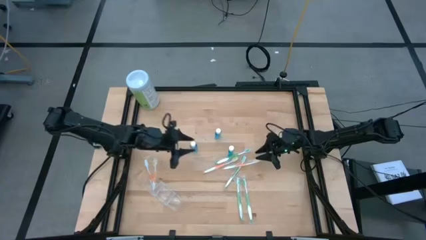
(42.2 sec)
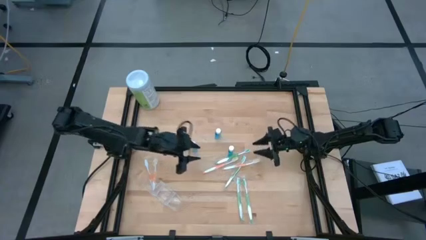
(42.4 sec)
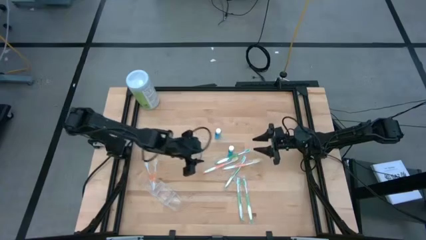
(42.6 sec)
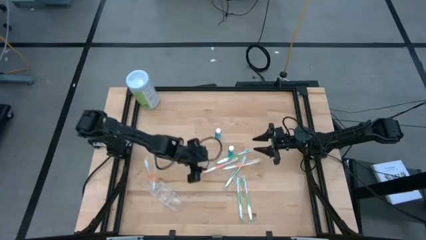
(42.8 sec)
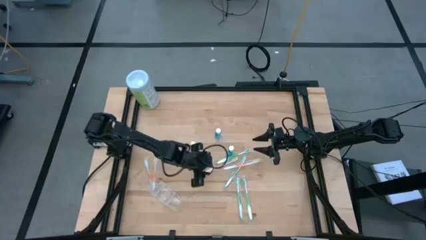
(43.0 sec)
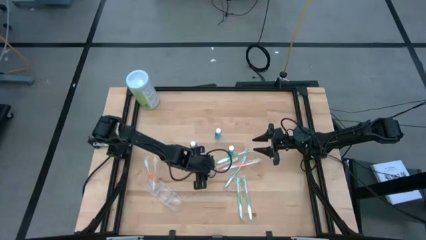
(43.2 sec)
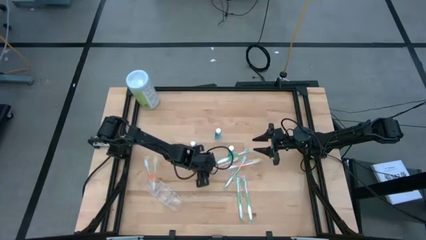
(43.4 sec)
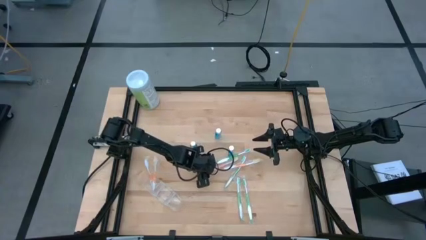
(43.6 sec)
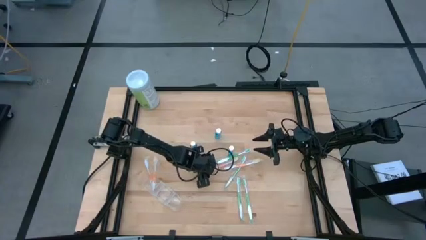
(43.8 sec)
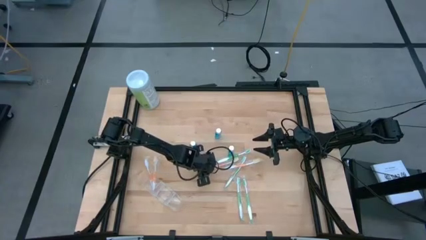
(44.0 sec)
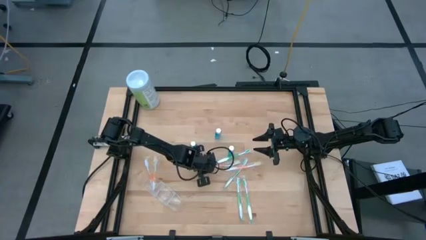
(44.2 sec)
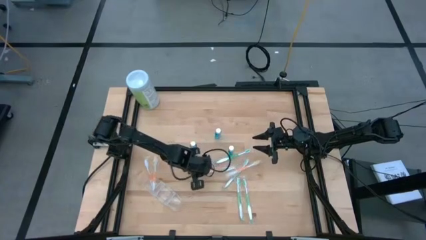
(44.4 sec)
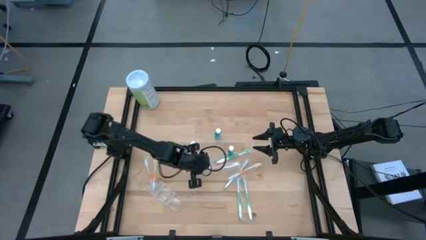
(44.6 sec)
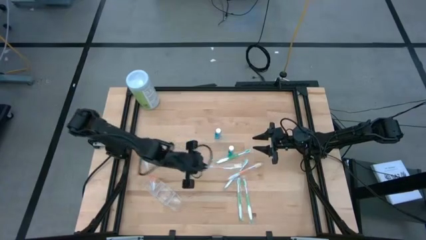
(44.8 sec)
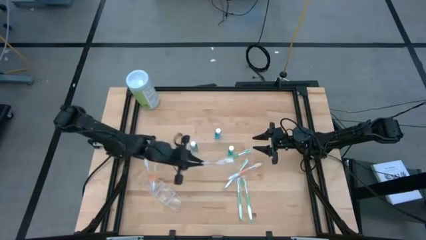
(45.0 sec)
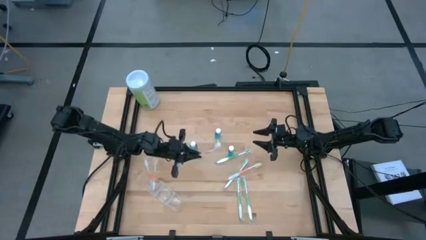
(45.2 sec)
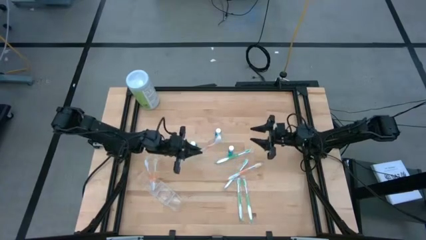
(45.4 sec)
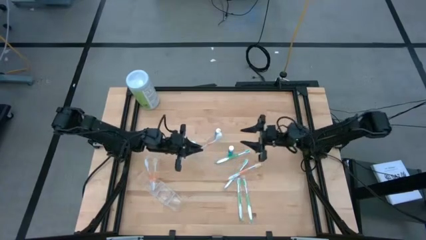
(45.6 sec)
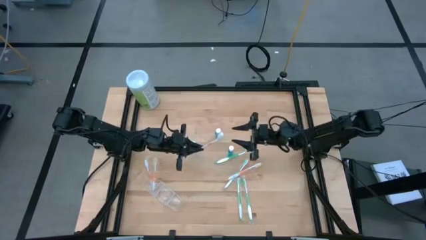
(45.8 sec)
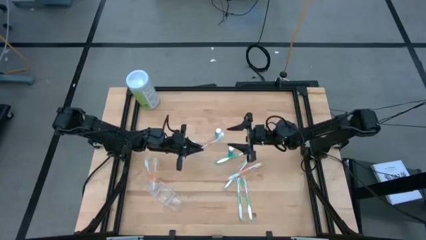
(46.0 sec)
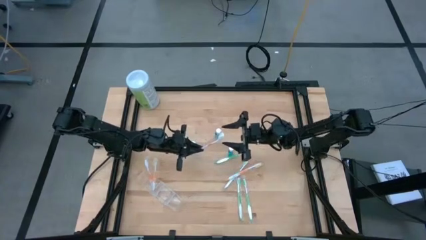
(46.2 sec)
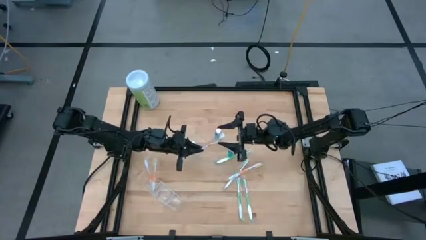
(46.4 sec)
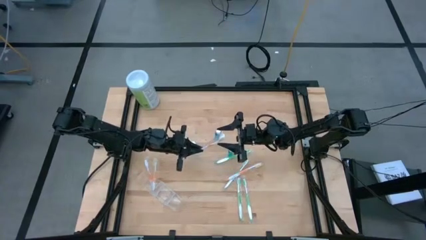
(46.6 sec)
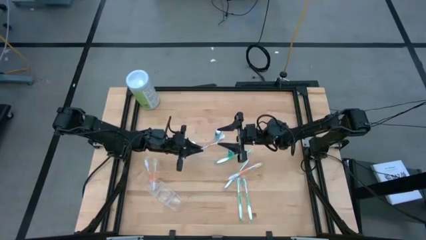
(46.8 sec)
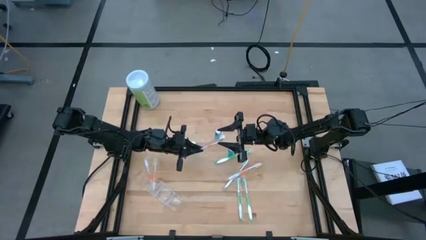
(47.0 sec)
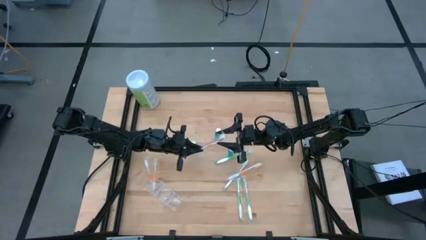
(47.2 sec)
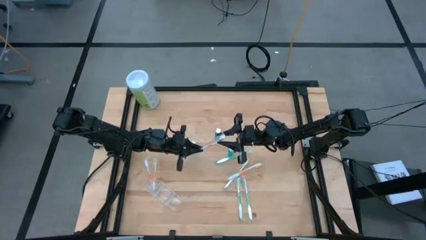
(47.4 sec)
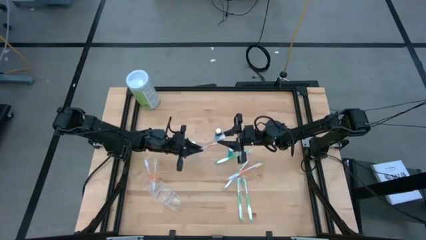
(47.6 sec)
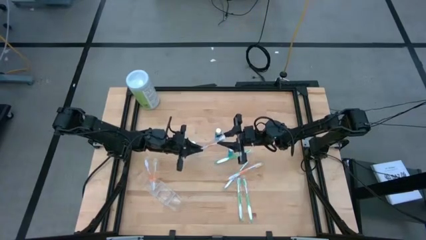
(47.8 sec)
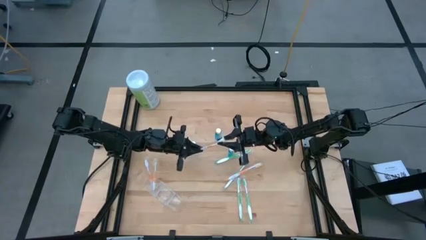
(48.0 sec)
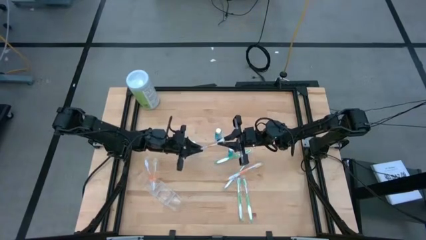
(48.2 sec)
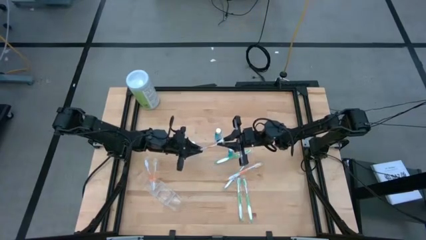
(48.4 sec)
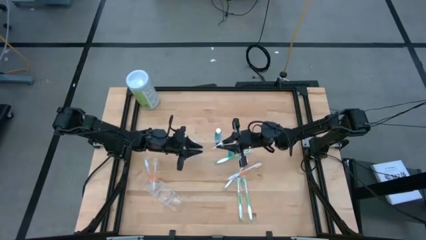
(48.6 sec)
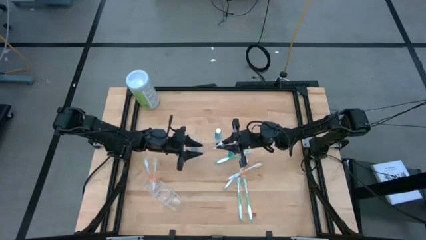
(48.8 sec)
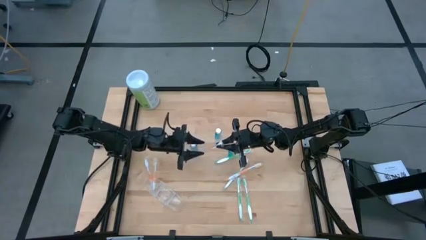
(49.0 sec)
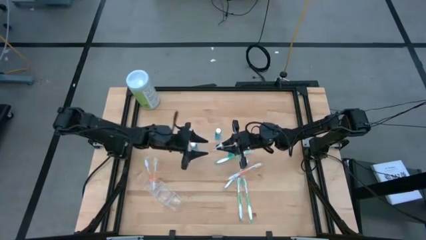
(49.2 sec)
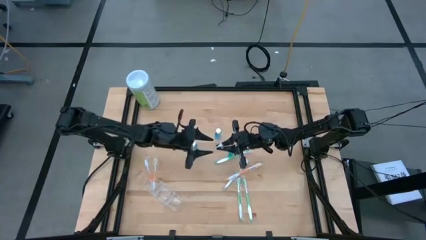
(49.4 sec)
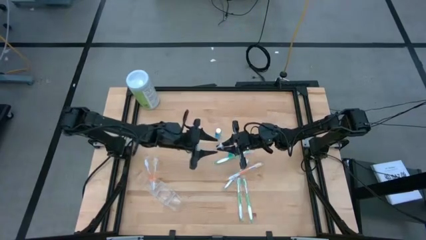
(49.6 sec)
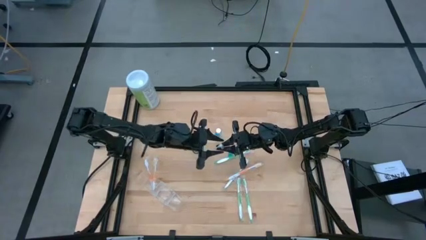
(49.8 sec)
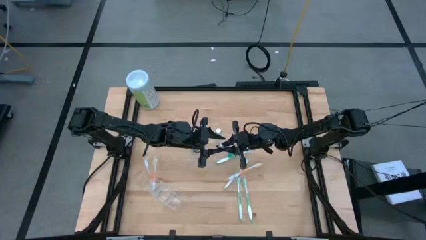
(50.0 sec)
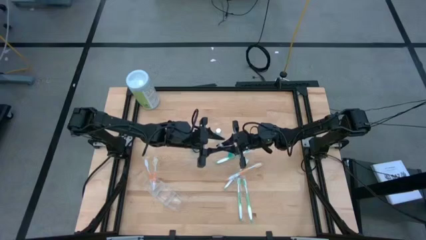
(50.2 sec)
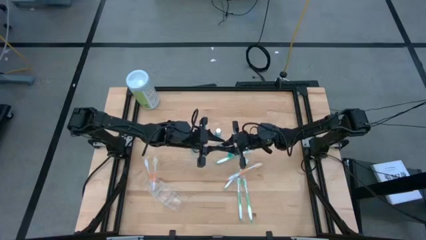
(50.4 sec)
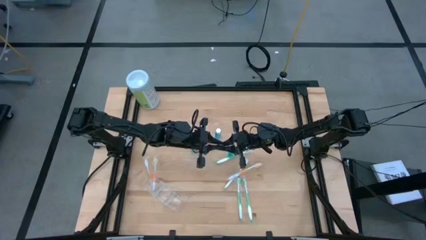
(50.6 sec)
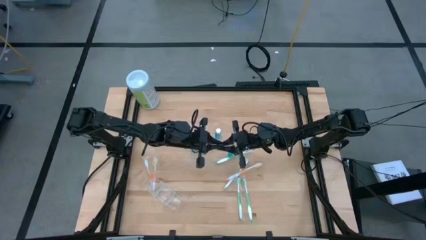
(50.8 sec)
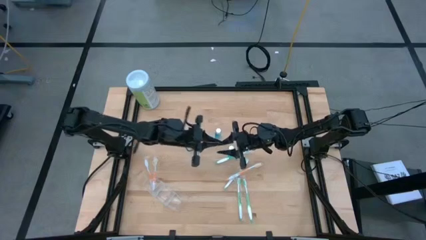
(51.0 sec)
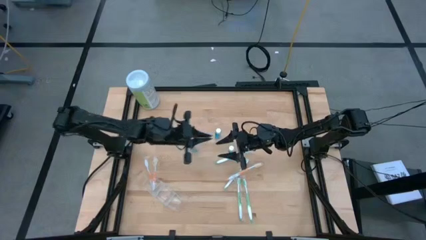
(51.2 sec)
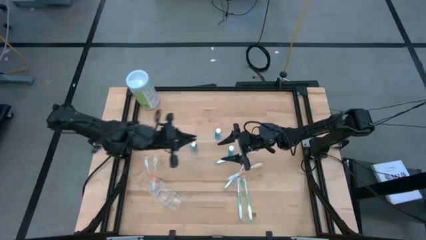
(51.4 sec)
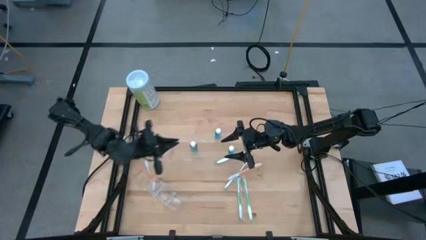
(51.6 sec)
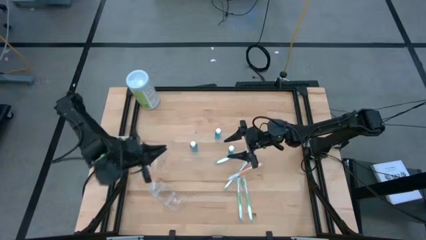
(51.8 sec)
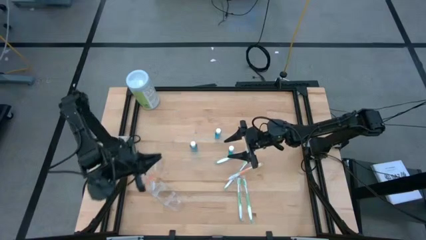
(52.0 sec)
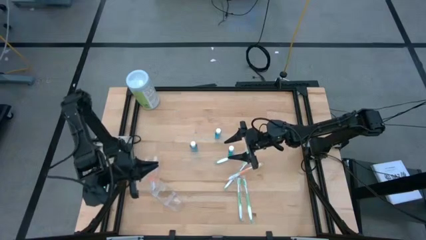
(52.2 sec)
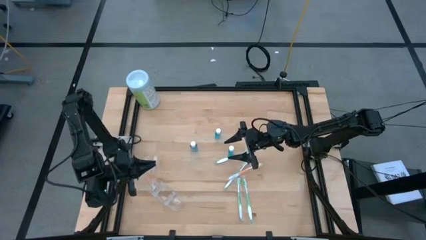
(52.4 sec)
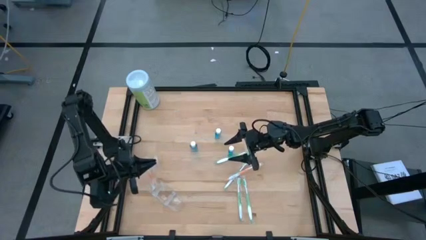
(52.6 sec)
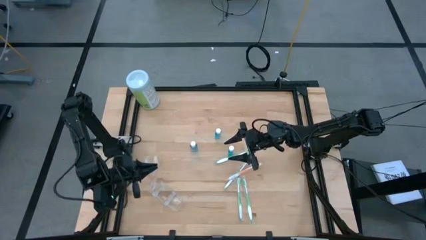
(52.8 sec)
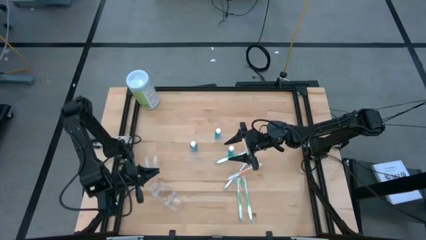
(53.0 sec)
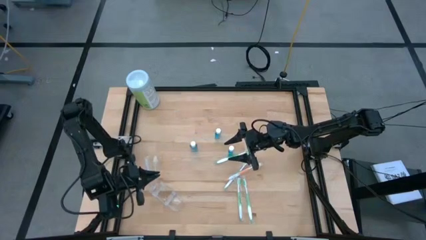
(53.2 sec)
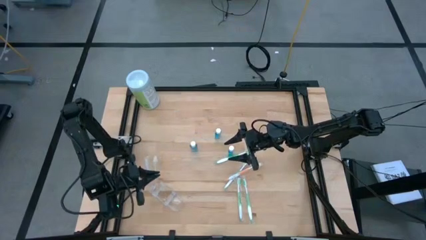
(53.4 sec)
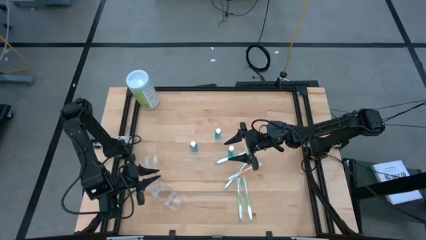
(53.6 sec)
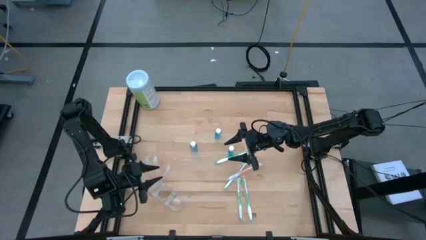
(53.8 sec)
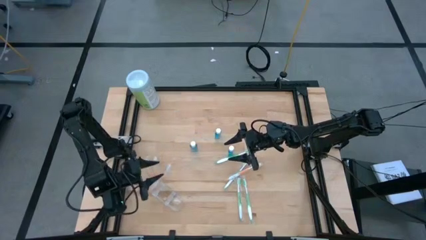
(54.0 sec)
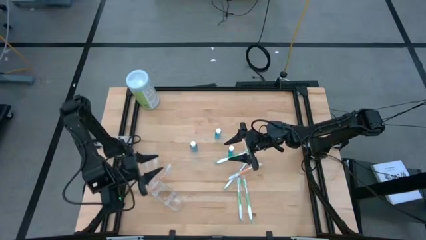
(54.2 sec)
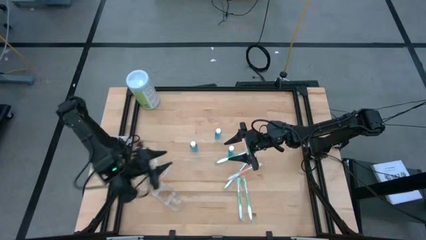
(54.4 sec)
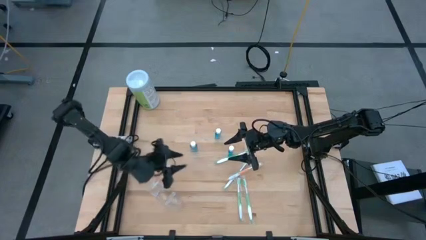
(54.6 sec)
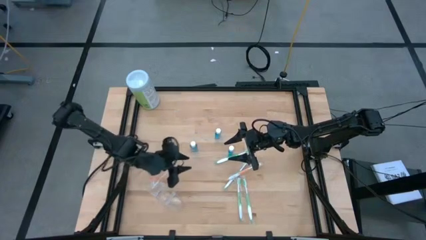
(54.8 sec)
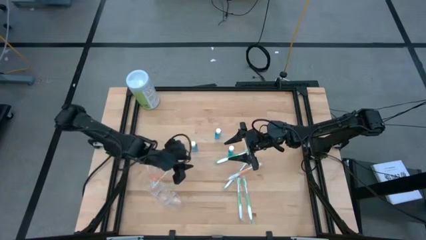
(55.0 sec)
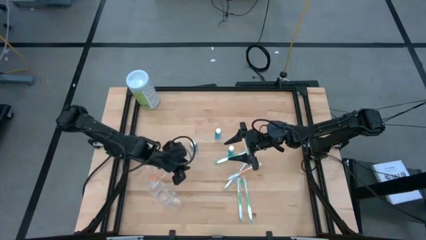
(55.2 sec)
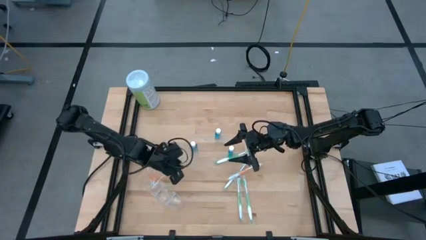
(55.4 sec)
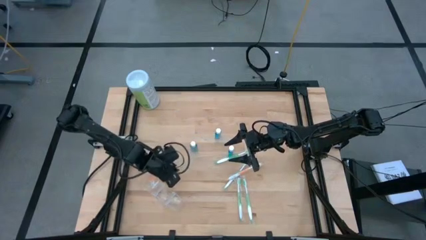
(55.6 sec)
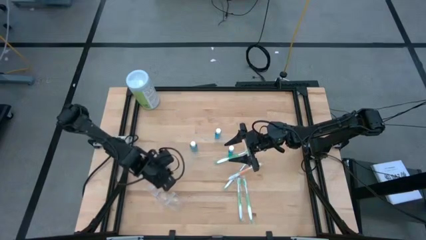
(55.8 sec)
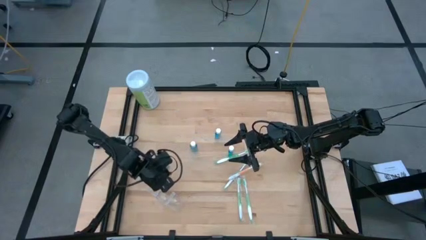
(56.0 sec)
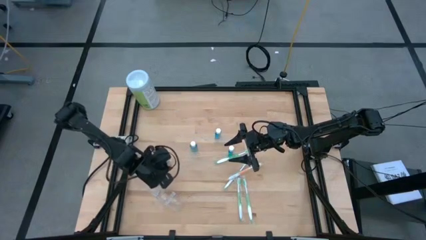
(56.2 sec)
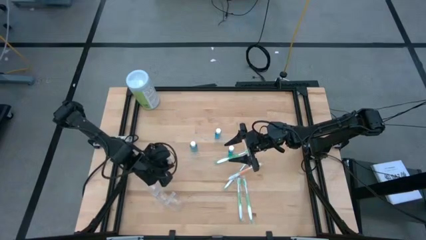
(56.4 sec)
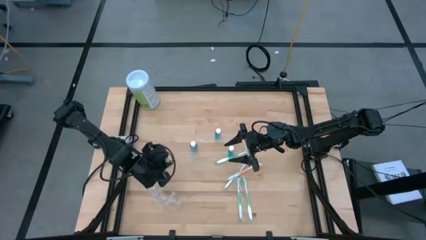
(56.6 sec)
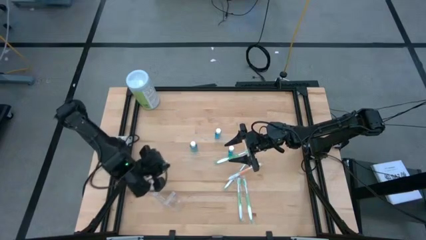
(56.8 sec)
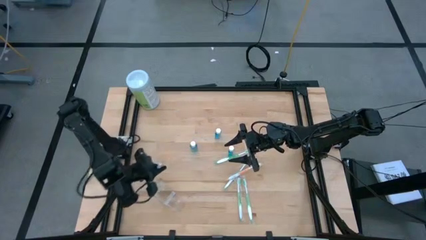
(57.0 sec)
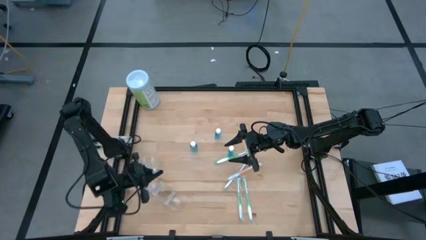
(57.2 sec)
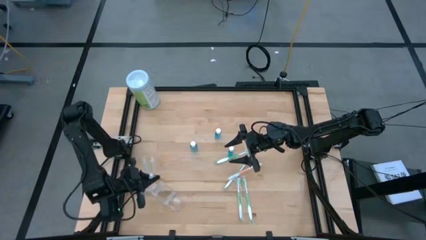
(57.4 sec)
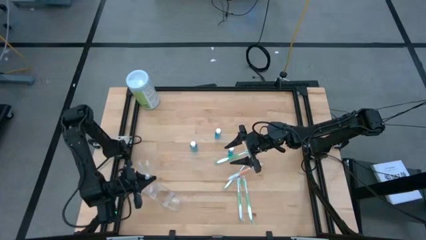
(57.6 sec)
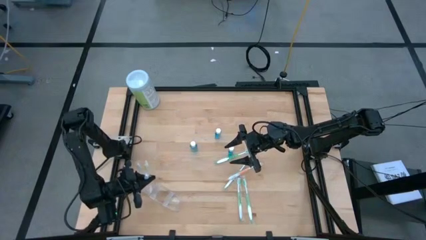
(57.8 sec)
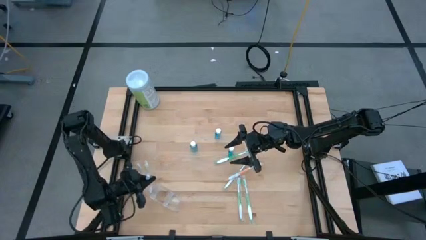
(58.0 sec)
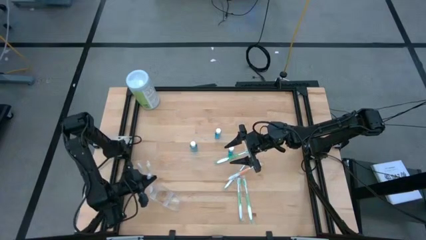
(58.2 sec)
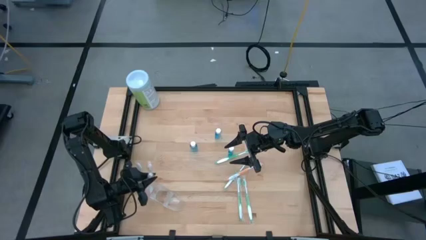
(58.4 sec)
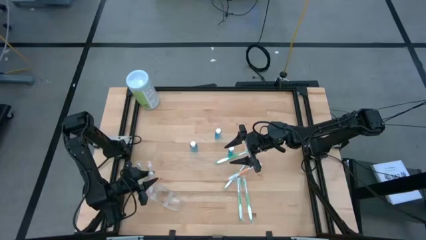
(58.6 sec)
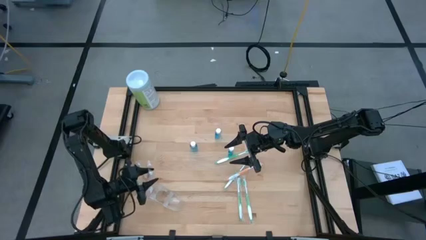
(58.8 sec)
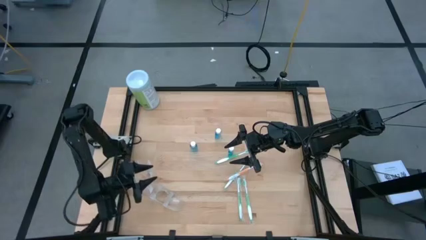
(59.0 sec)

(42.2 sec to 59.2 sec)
Task: Pick & Place toothbrushing station
Put the orange toothbrush into the transparent organizer
